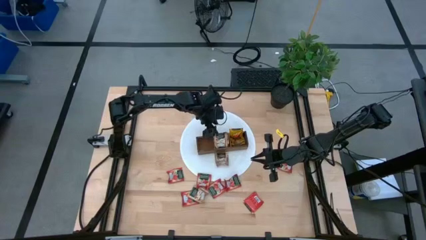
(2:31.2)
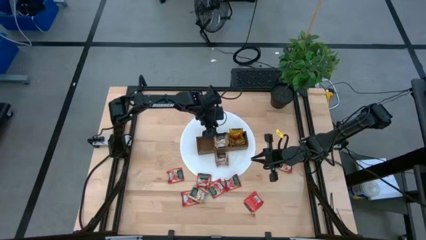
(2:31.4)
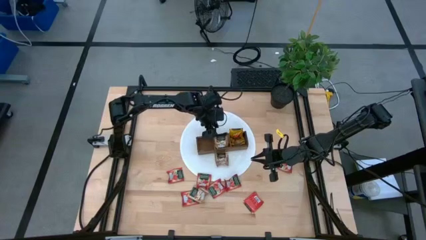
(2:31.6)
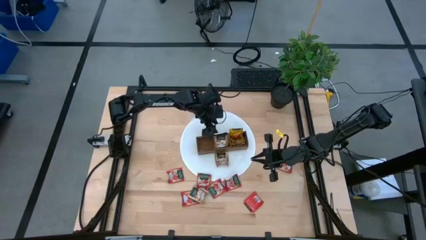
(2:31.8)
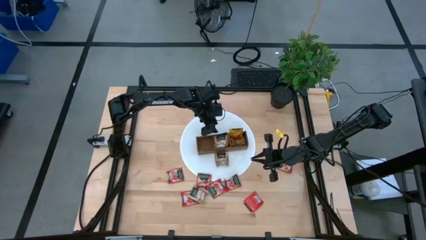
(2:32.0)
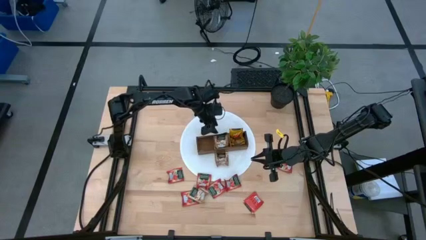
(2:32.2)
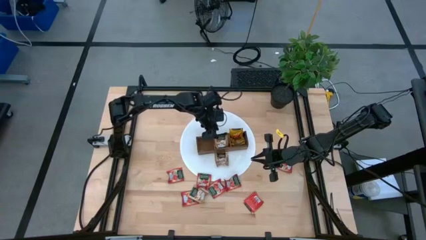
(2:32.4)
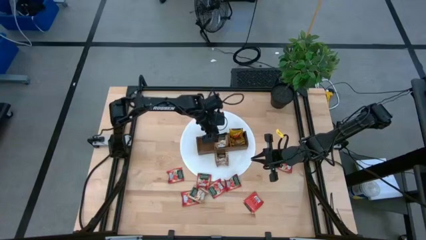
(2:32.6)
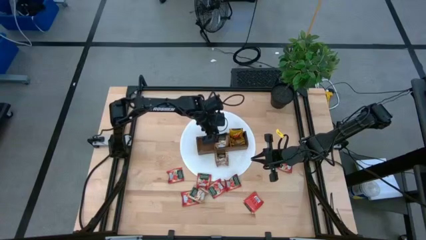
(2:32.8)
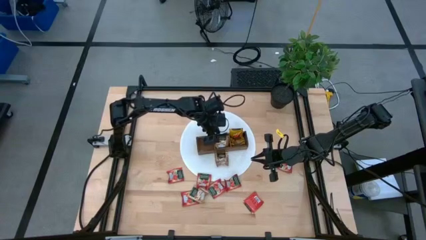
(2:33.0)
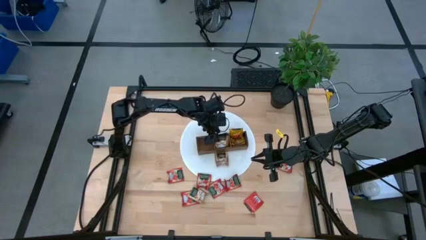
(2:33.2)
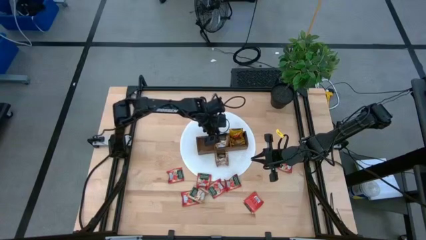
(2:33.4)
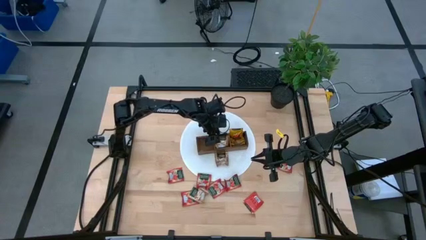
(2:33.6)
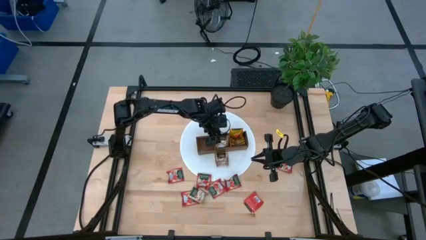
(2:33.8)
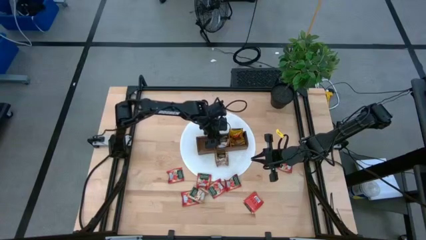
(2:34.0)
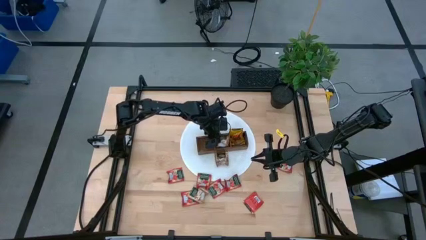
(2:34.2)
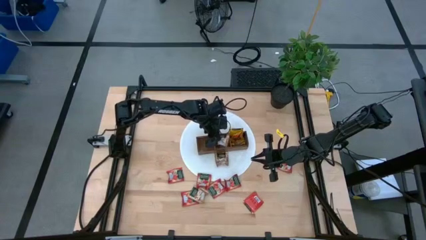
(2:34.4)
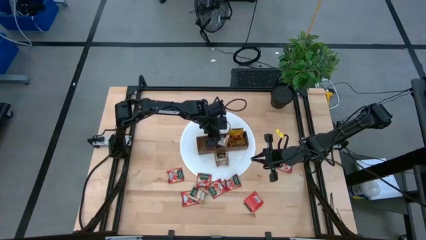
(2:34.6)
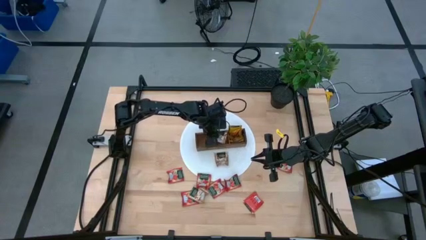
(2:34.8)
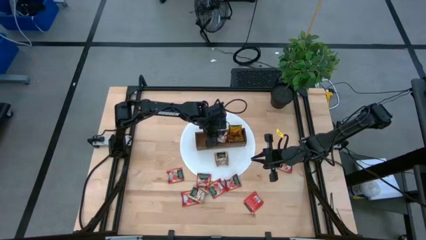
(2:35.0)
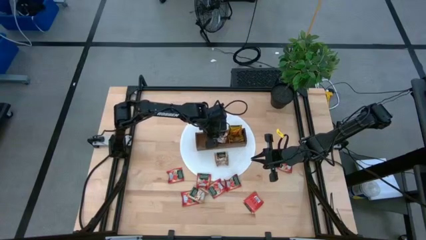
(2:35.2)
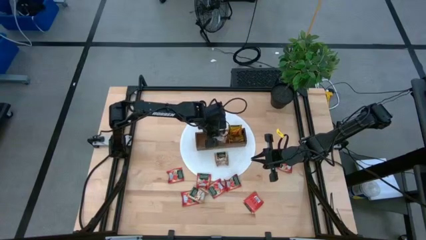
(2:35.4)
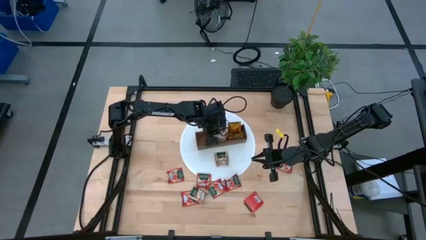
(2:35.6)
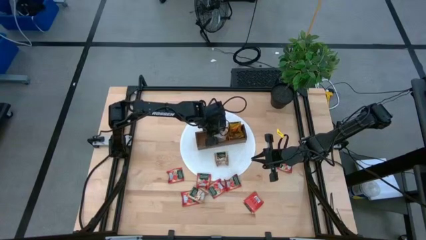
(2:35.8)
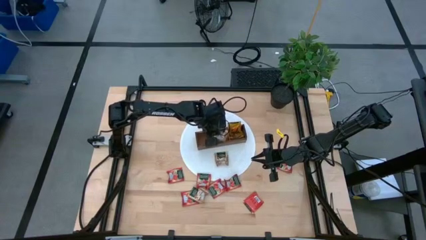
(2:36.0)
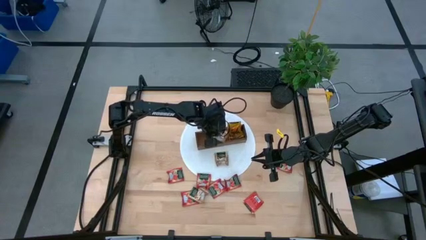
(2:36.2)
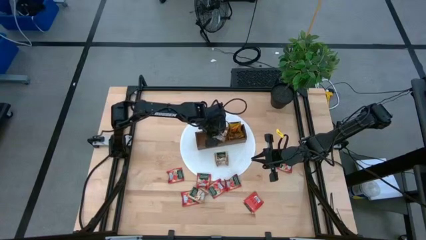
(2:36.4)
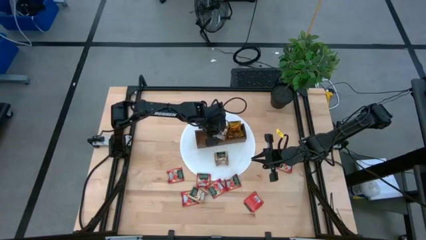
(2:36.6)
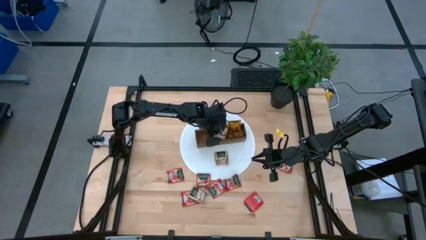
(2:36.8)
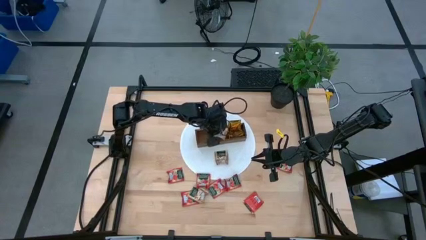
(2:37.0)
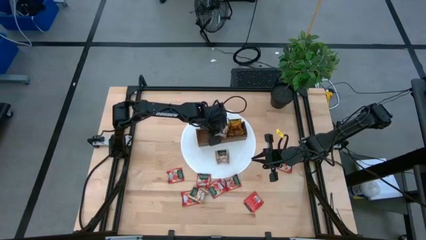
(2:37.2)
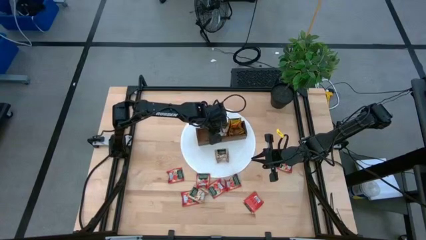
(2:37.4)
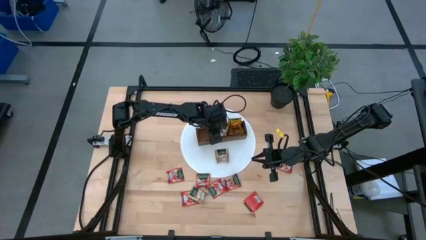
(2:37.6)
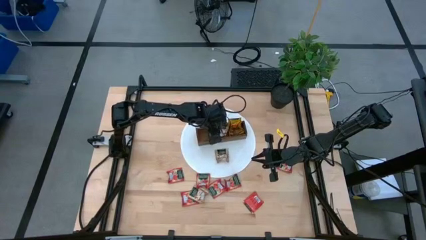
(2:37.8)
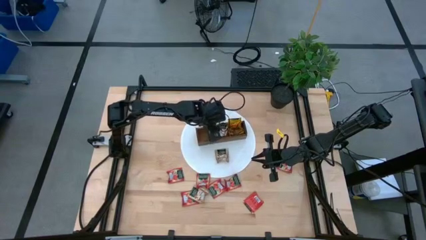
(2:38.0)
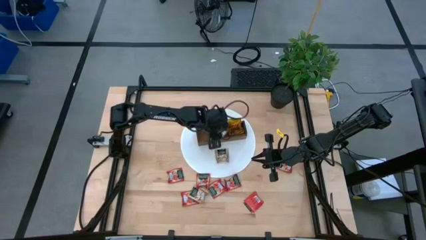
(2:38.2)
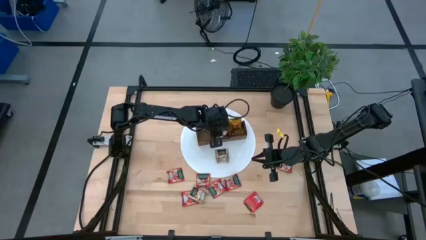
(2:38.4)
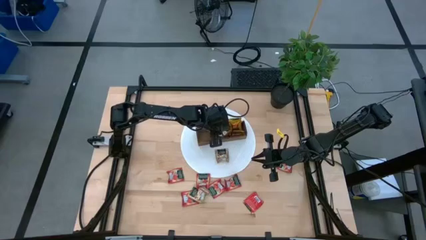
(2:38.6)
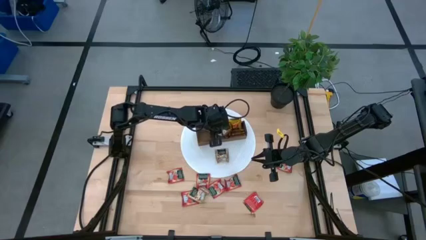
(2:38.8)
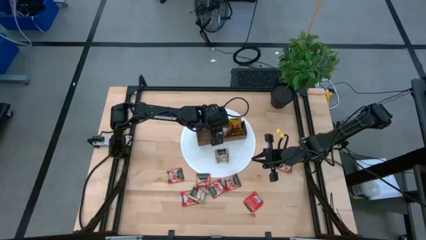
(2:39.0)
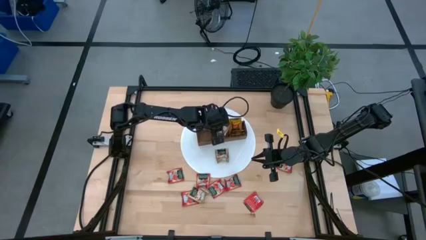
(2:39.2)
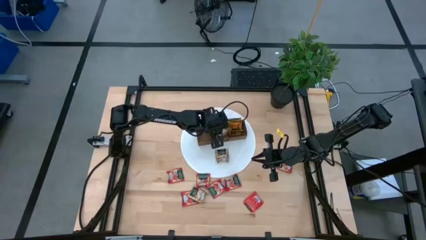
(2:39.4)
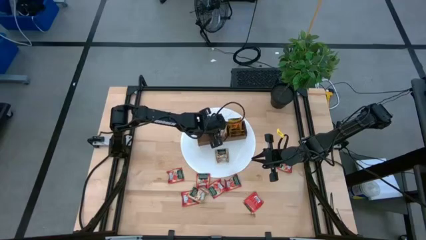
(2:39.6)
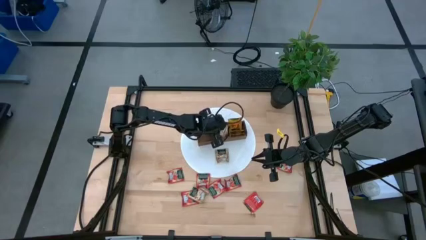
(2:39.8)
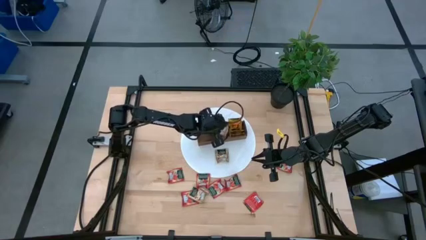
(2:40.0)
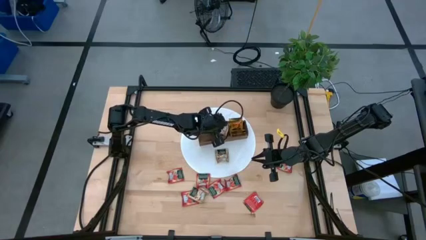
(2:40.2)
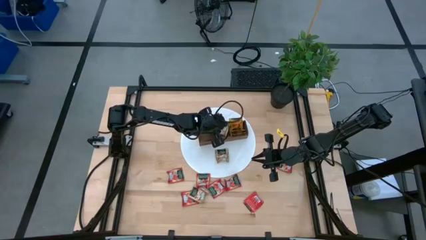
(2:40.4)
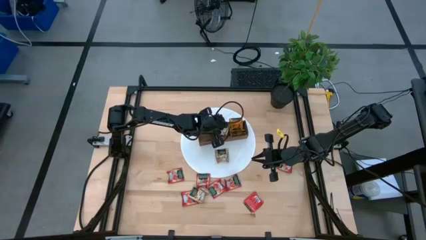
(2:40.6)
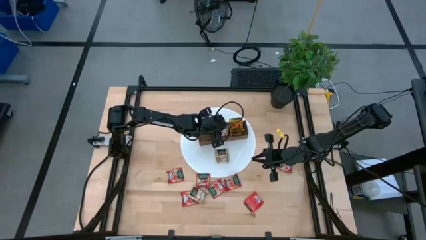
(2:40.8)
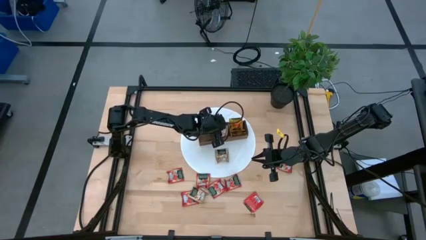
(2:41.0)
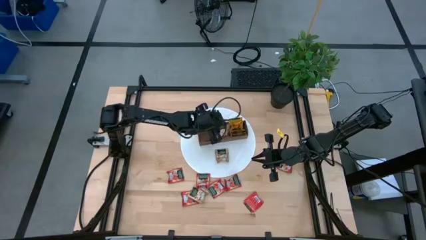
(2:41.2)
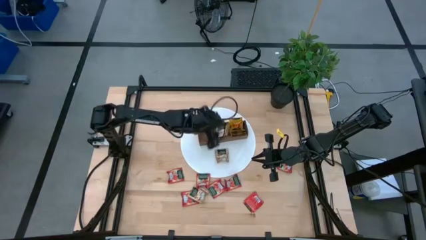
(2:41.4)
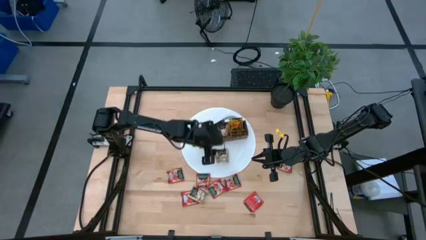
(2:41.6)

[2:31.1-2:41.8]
Task: Pick & Place Tea
Adjust the brown tea bags into the middle section of the wooden organizer

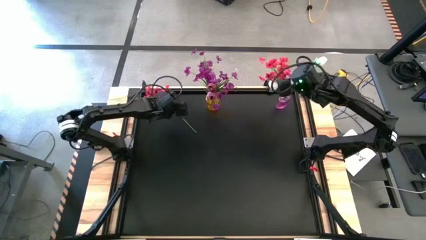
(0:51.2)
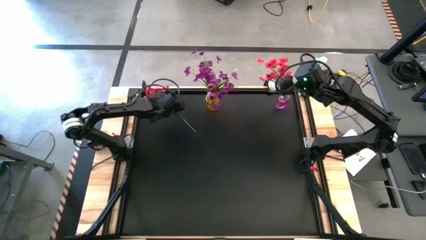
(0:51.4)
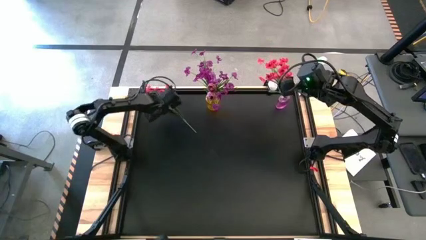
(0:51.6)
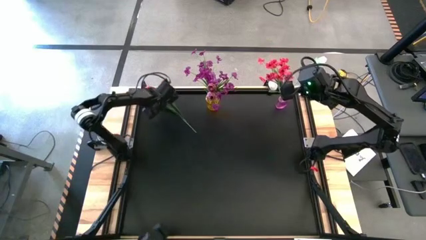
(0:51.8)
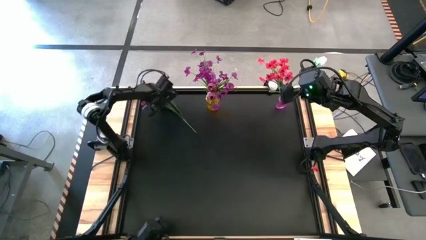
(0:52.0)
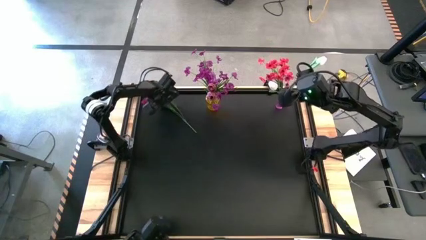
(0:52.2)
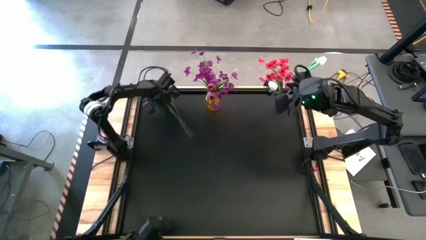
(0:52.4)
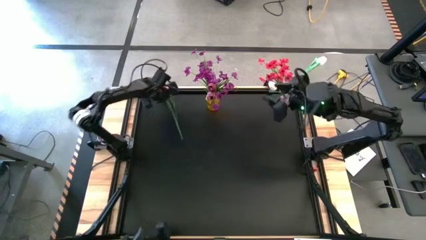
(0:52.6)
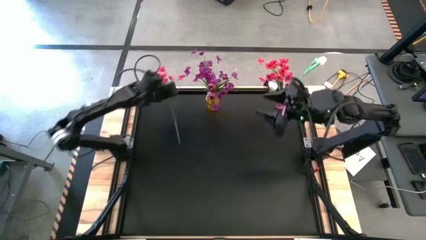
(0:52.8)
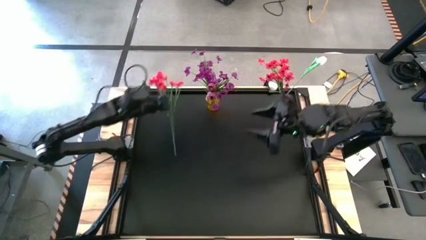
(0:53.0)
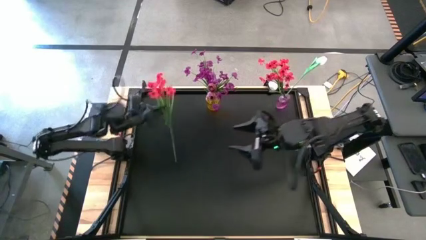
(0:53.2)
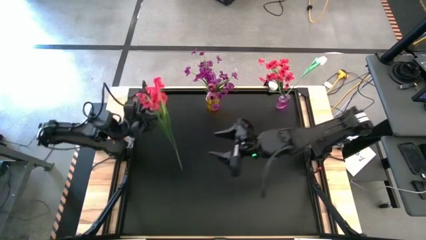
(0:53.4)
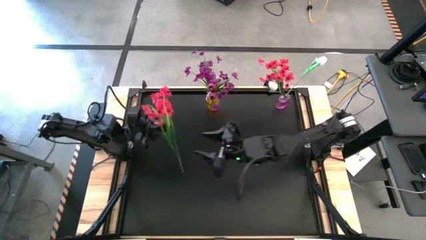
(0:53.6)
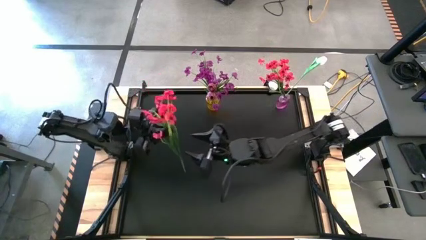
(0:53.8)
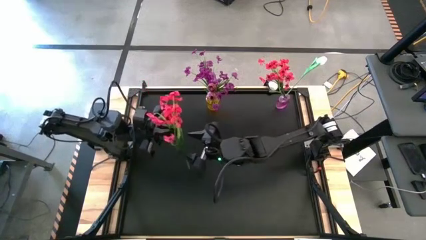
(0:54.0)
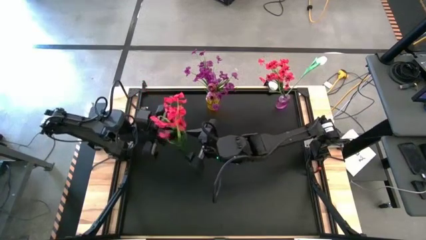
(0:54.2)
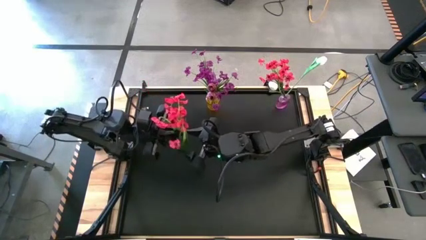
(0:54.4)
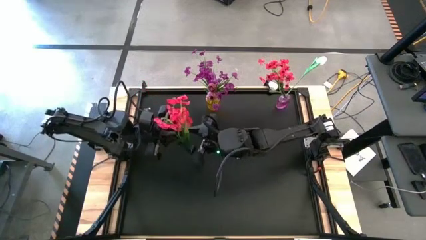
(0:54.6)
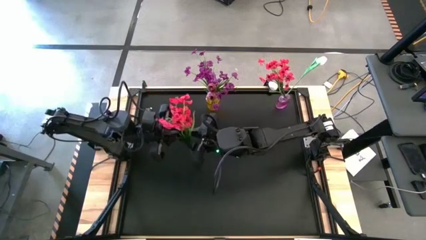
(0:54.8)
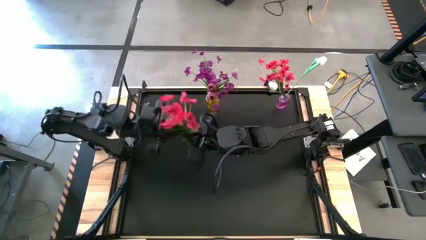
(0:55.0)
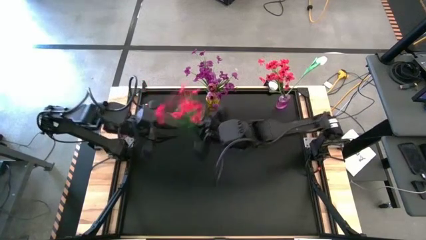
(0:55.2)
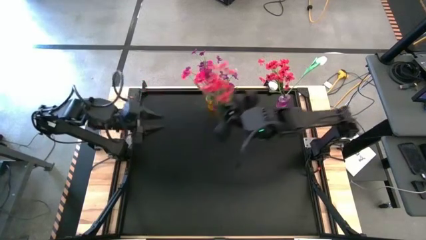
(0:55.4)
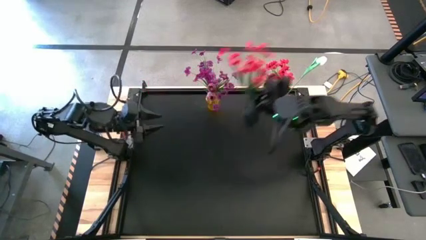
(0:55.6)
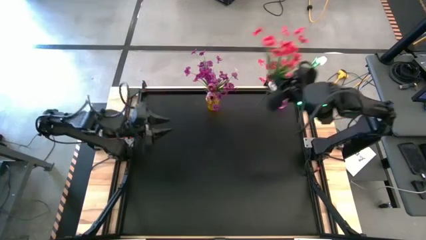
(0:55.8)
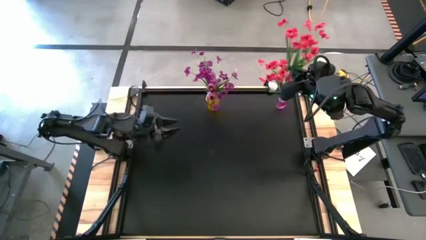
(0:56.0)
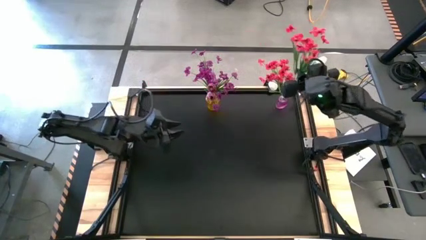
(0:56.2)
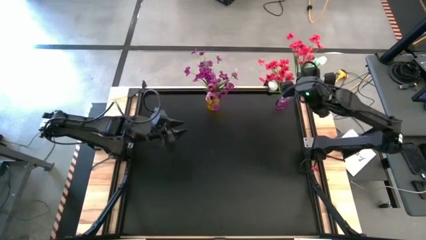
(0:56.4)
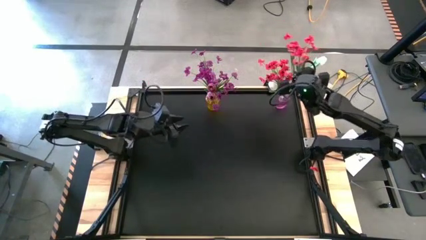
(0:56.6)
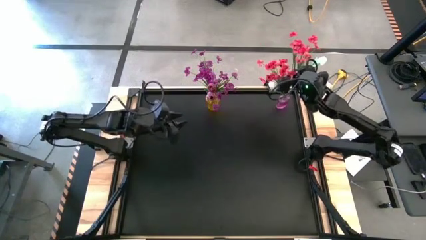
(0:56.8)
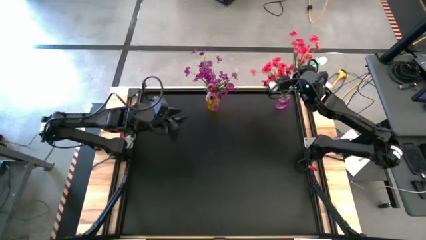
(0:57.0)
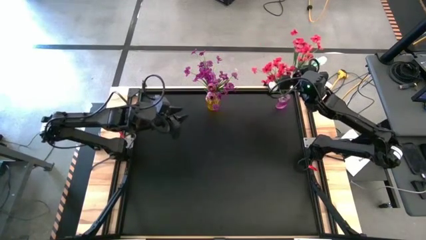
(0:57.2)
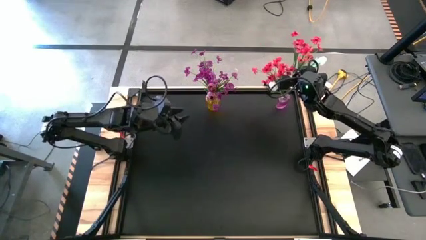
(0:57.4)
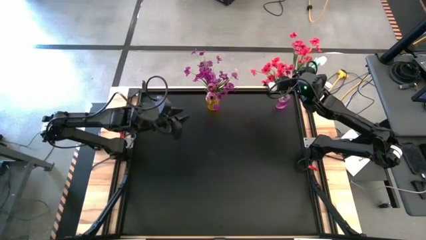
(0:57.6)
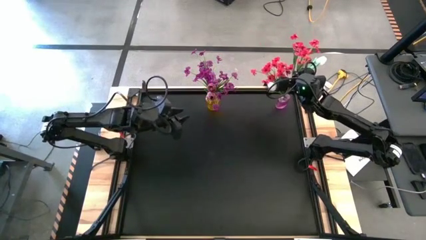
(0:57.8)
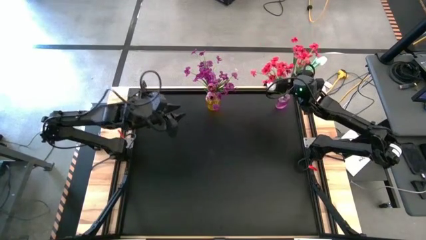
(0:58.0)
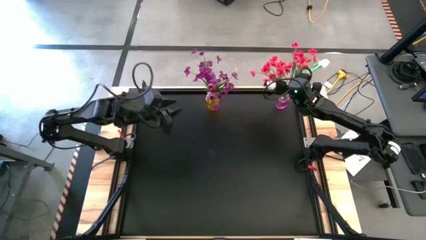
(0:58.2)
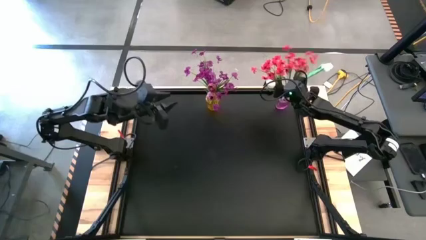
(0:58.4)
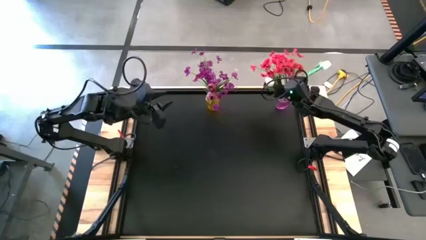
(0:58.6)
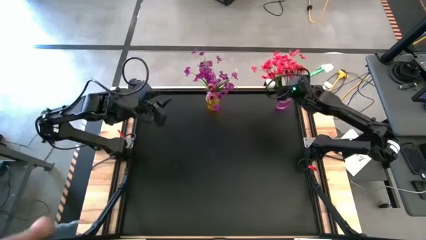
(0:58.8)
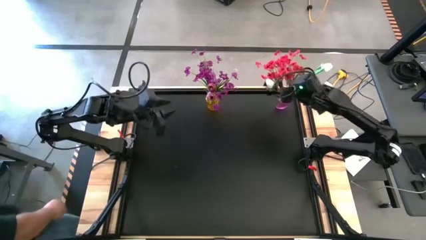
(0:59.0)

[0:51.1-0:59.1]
Task: Sort flowers into vase by color
Put the red flowers into the violet flower vase
